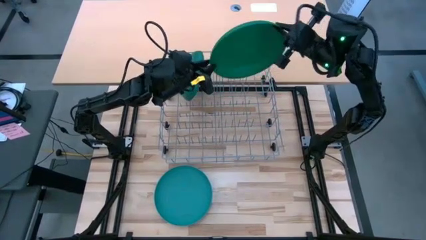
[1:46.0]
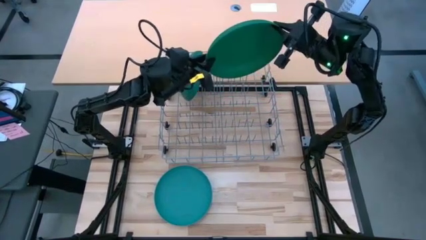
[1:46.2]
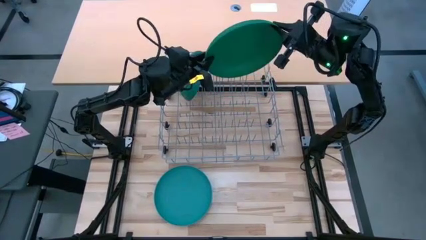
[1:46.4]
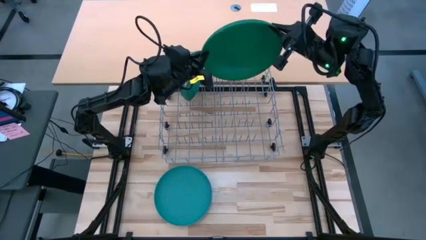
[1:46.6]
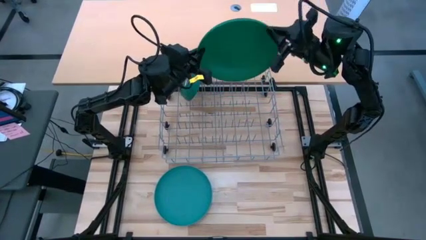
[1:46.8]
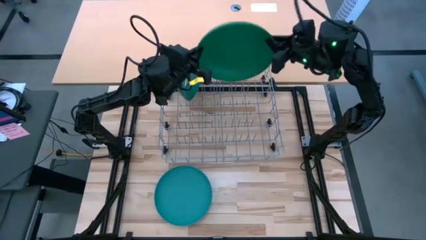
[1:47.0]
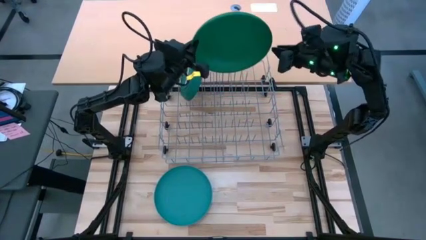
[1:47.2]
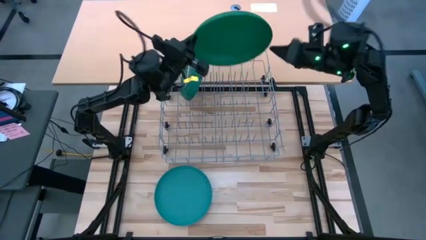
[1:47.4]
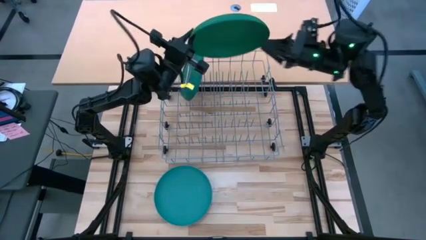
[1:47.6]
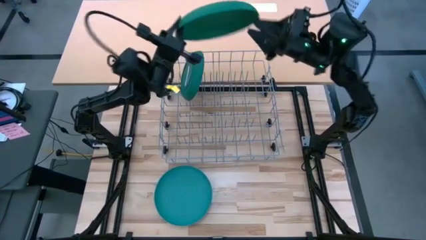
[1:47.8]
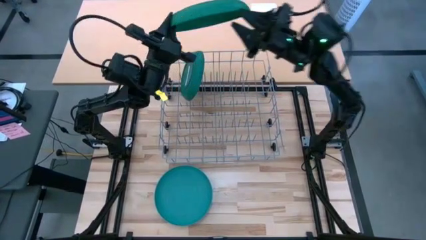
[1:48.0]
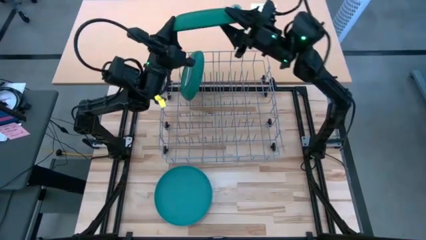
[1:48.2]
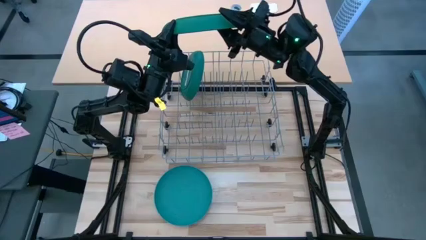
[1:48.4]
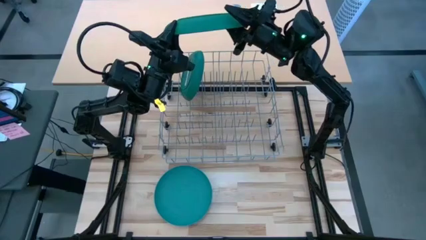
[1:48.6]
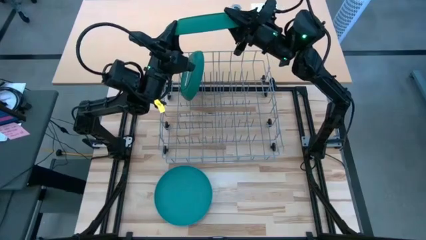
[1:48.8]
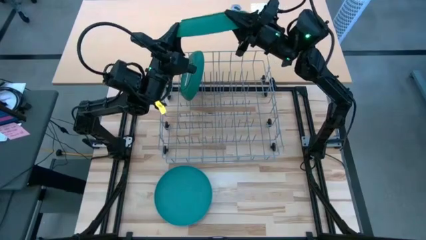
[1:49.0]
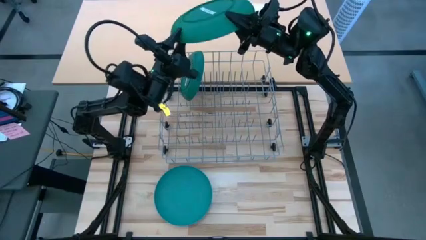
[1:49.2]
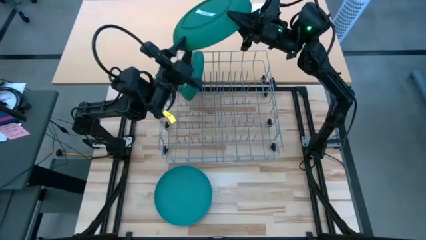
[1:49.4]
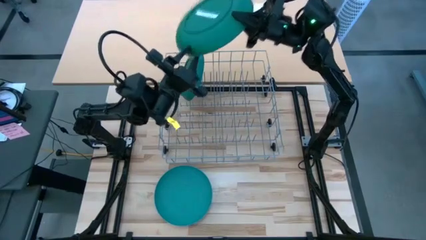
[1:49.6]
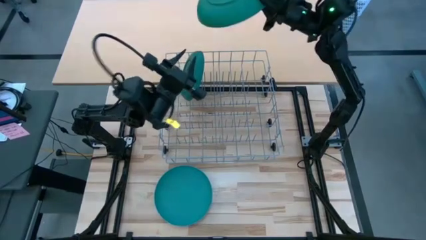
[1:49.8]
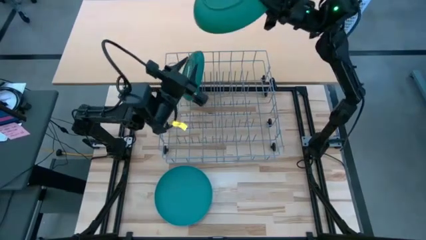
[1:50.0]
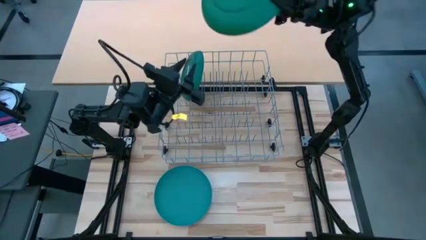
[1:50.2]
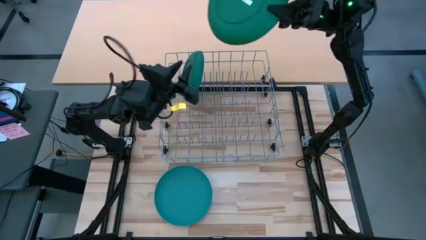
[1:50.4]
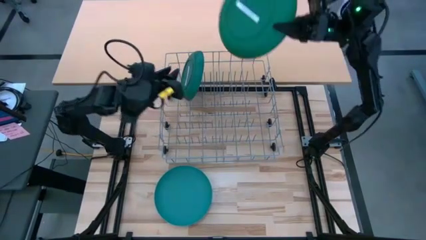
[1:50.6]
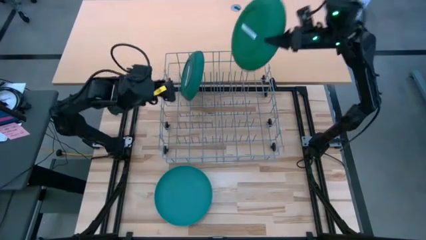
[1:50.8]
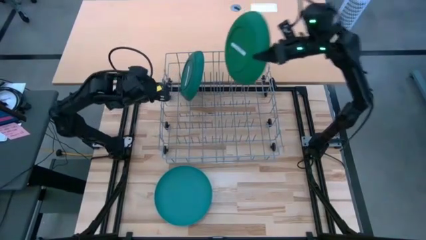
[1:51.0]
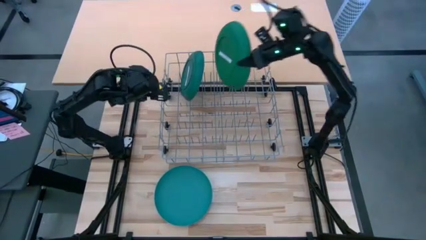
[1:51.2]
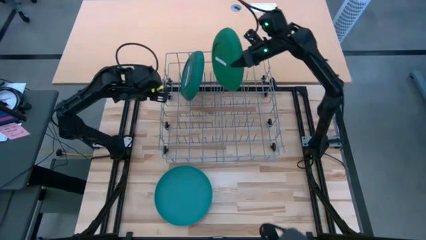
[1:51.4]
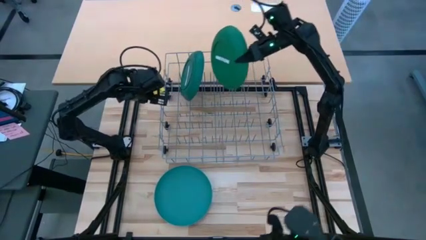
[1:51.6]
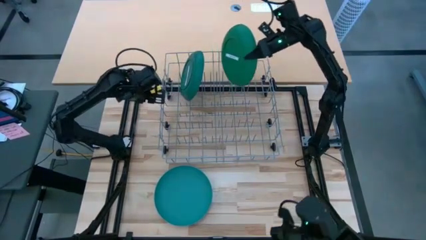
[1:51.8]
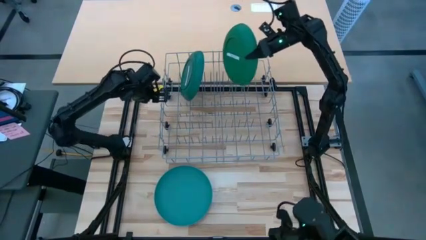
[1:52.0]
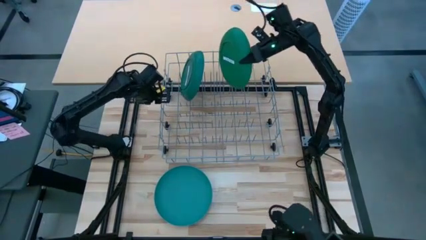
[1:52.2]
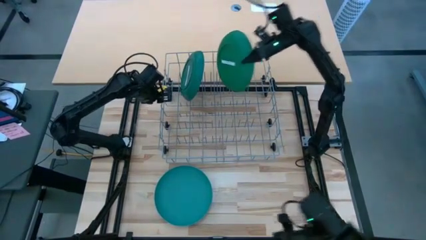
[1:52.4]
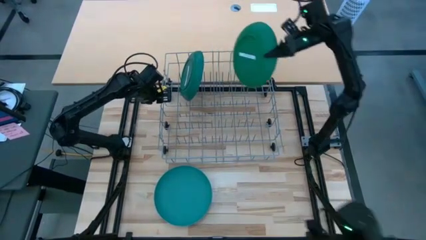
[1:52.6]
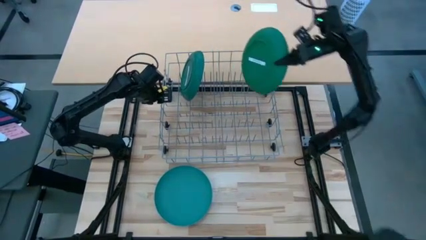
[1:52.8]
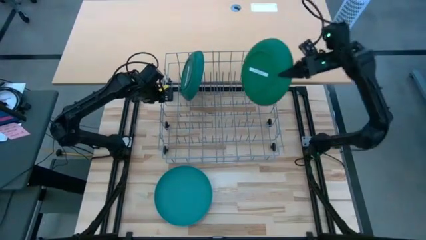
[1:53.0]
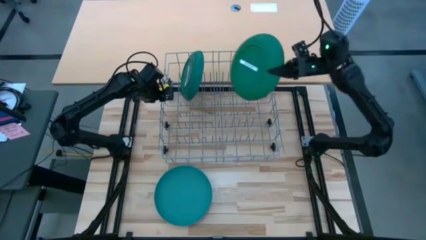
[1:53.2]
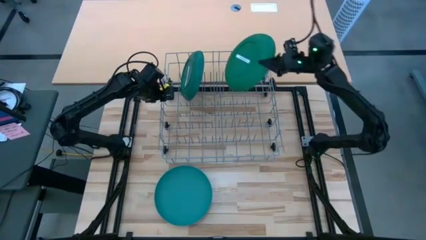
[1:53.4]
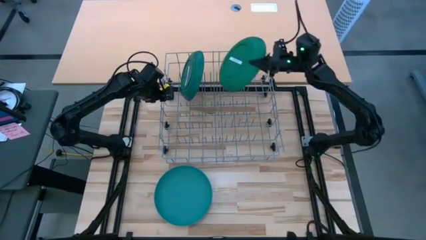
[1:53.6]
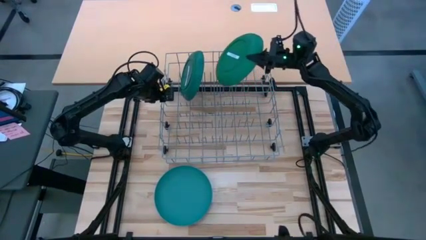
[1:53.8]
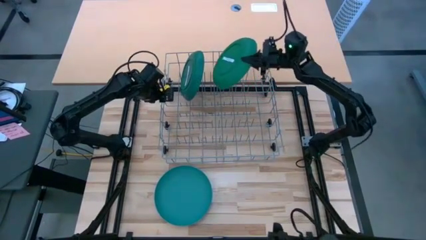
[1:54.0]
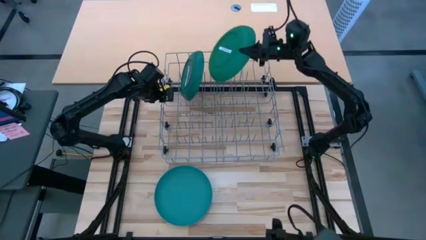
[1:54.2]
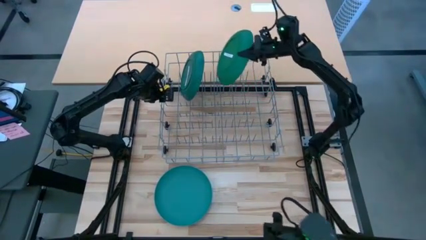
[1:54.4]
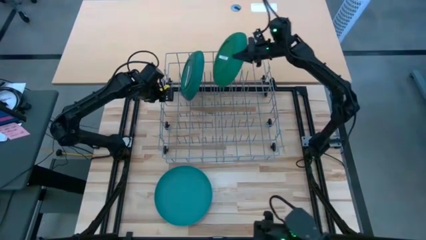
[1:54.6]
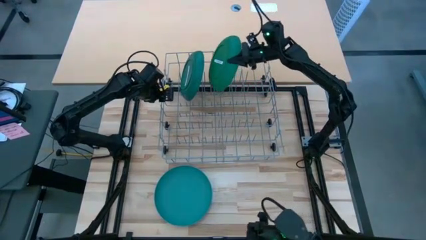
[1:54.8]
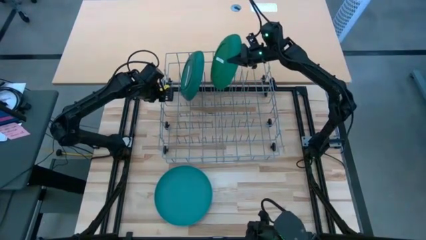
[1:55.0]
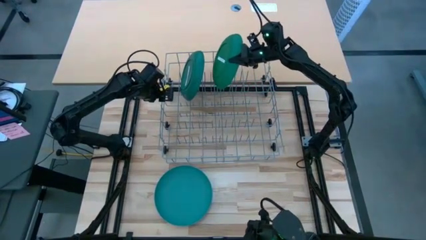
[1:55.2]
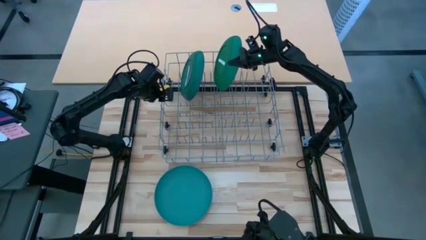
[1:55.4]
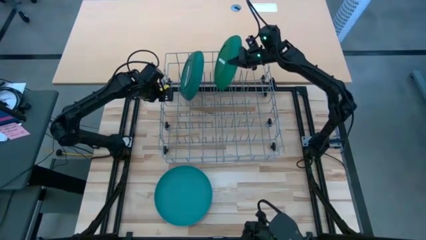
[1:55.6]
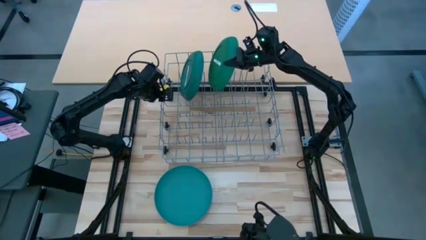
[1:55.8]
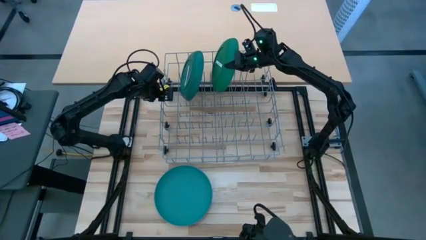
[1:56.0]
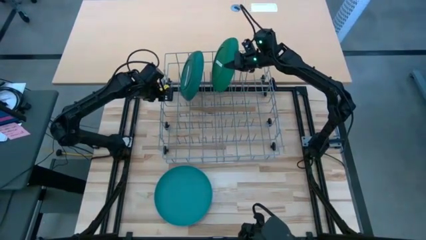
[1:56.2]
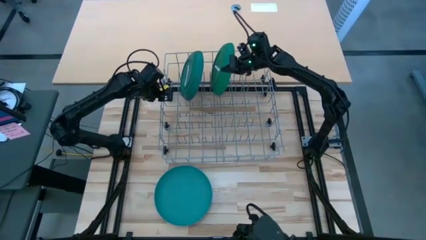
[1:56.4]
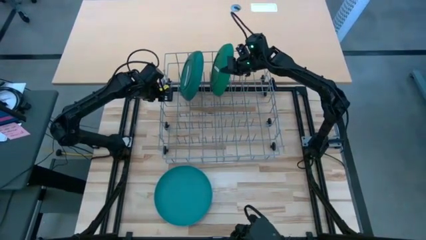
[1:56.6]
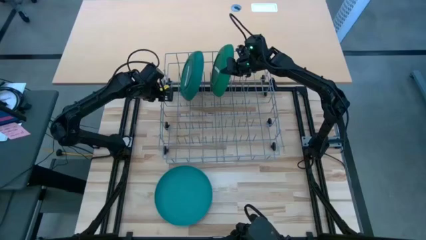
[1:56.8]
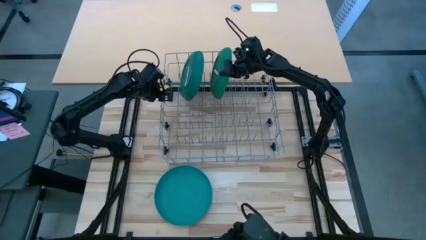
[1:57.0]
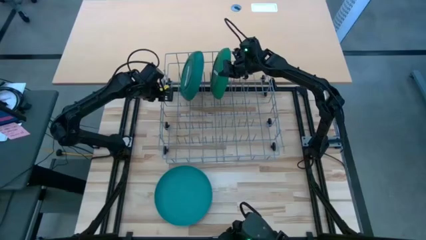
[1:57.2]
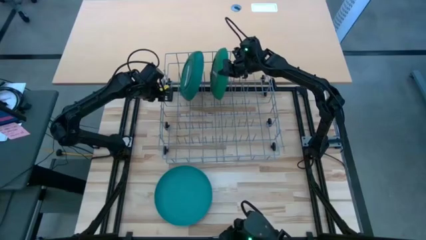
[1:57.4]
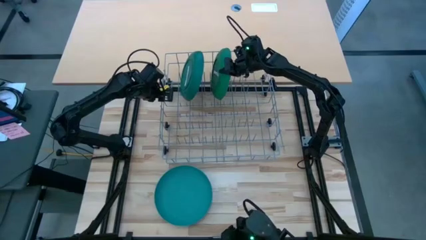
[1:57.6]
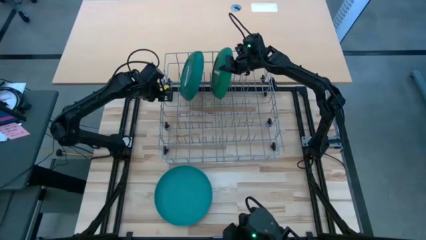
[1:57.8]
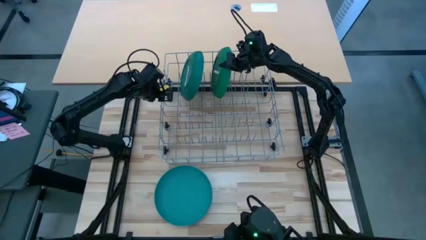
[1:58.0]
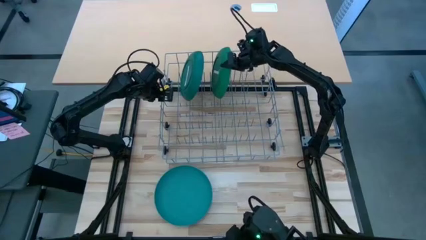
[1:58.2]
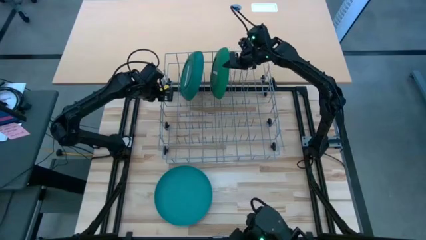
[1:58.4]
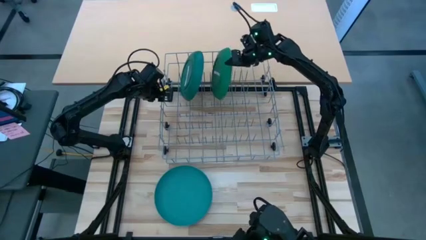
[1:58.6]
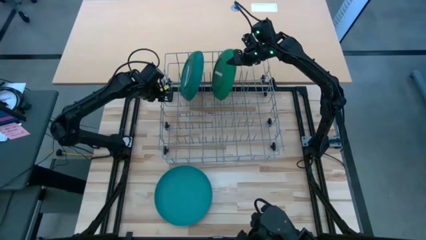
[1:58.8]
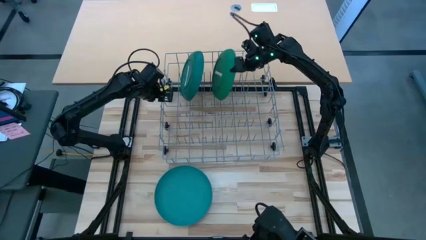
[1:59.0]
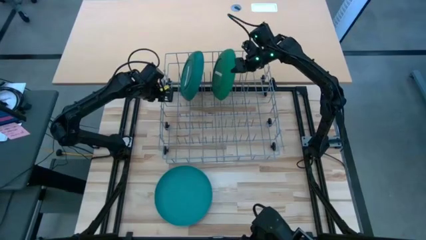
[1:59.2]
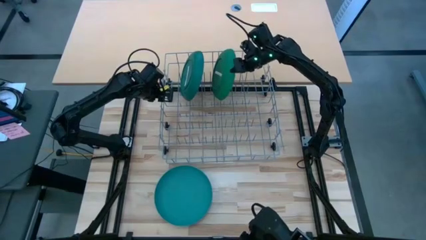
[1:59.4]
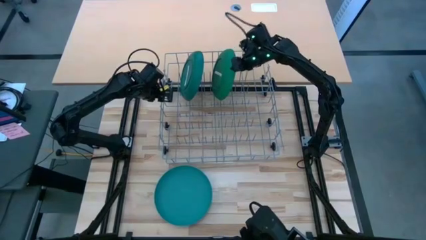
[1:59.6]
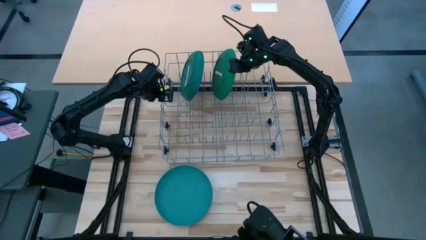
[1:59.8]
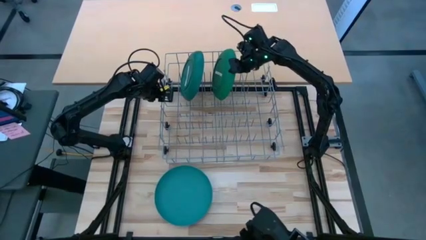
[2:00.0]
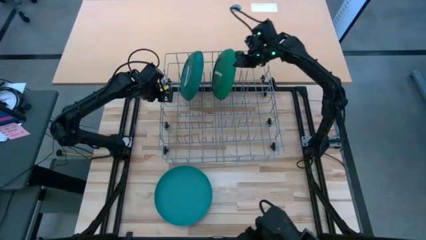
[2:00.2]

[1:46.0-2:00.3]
Task: Sort dishes
Put the green plate in the dish rack

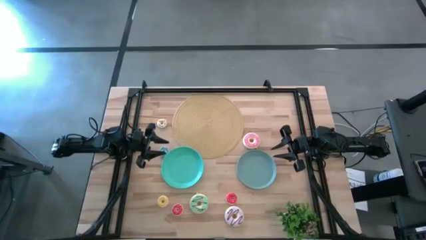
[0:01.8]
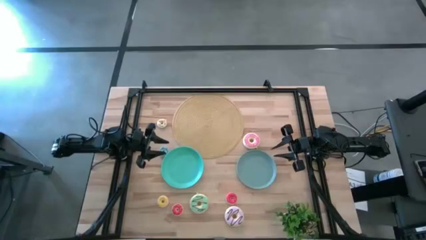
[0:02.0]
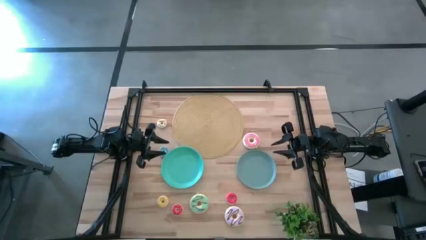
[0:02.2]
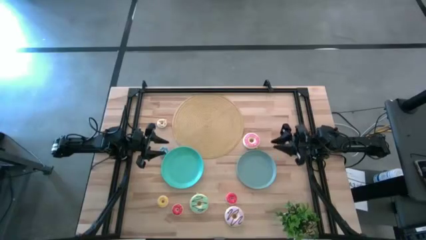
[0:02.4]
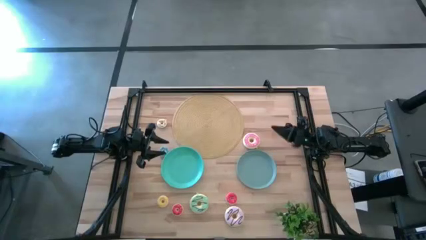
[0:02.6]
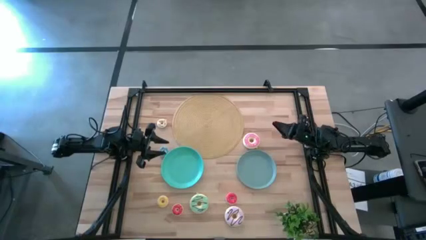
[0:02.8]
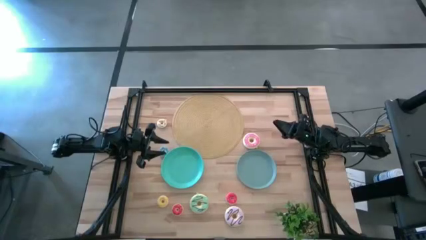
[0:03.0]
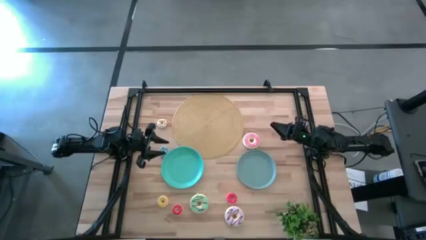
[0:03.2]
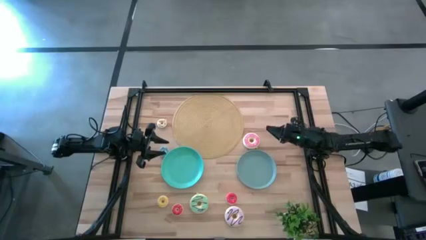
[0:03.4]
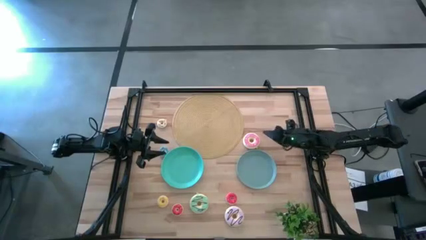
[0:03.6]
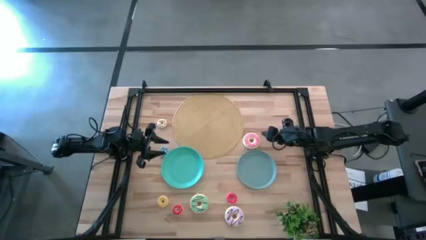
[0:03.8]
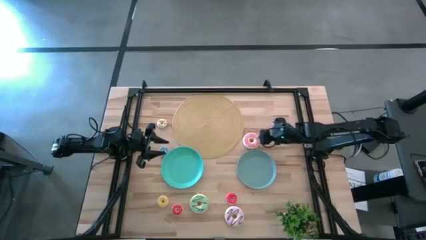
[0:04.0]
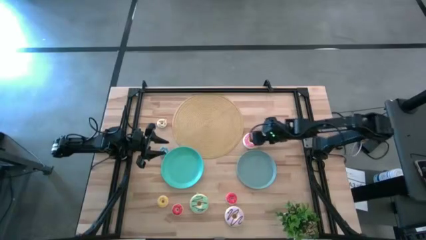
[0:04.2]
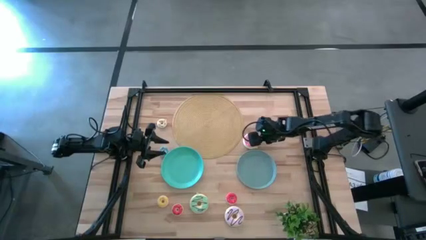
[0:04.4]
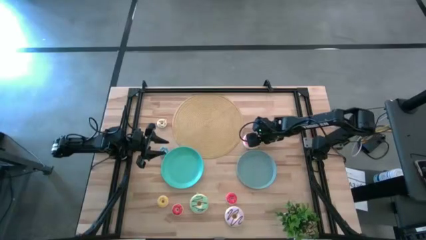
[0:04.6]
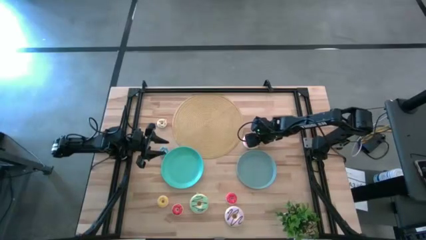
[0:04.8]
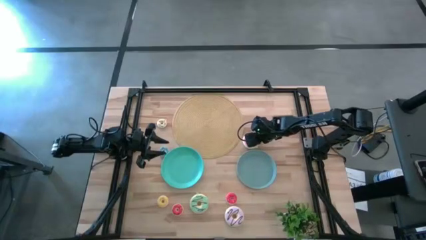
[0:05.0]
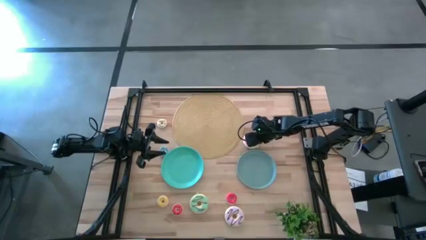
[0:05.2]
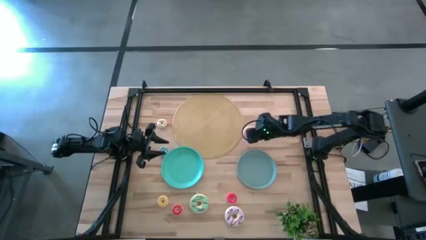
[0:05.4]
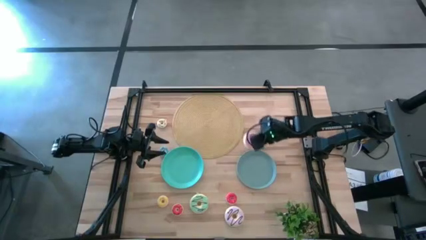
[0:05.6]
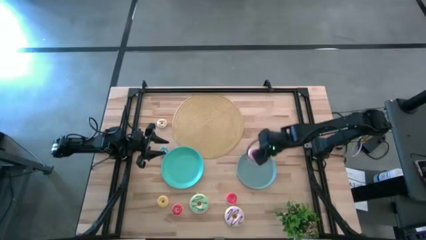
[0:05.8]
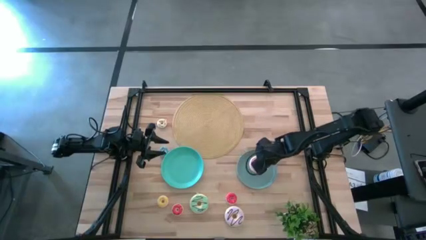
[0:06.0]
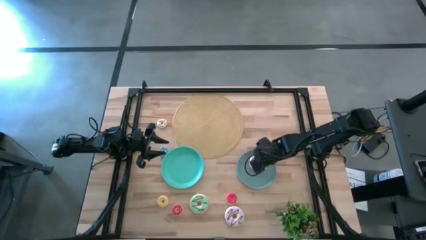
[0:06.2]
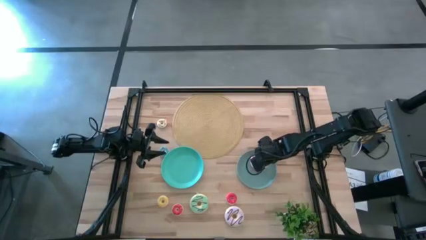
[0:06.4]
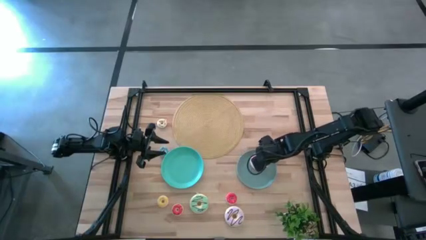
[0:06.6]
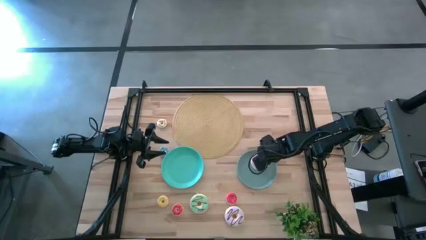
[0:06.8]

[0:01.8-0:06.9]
Task: Pick & Place donuts
Put the big pink donut on the blue plate
